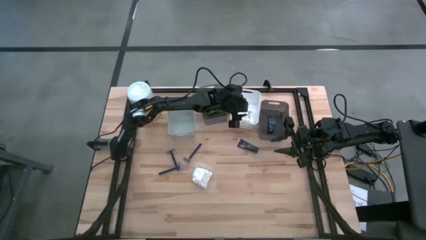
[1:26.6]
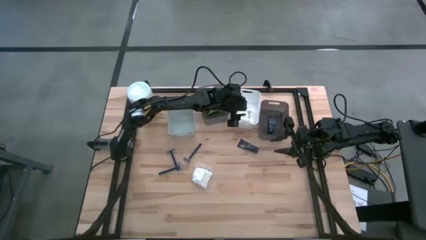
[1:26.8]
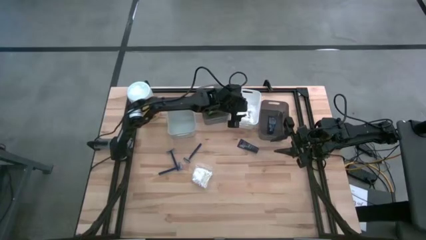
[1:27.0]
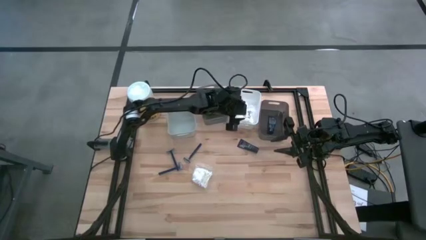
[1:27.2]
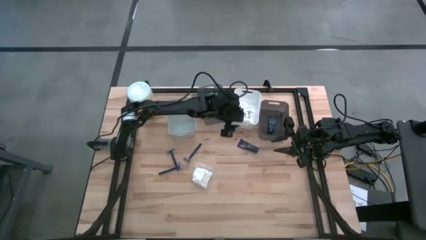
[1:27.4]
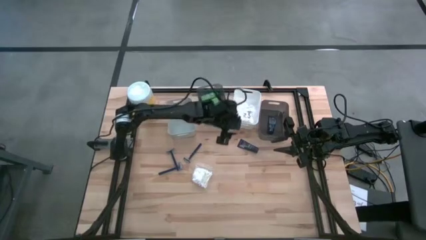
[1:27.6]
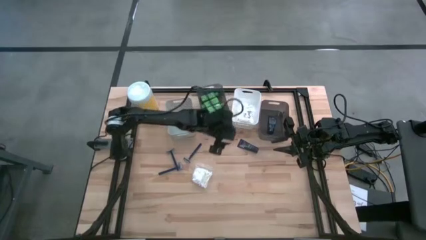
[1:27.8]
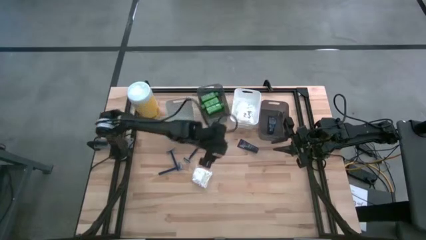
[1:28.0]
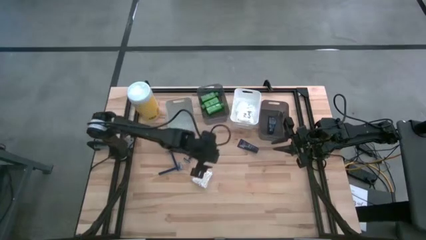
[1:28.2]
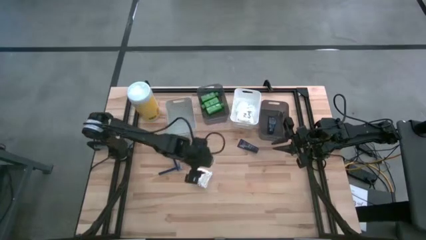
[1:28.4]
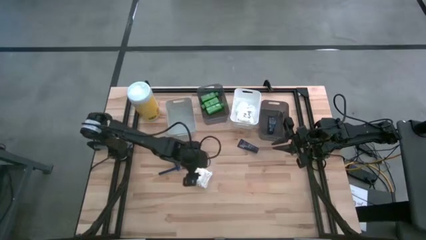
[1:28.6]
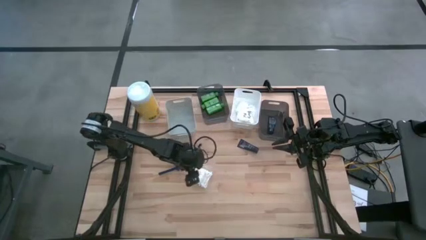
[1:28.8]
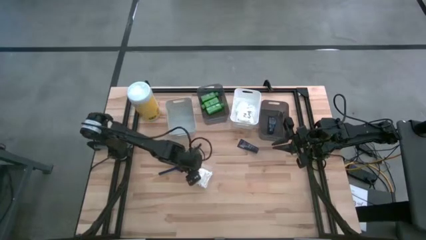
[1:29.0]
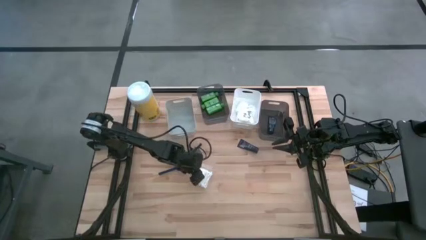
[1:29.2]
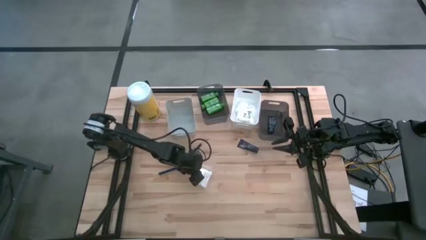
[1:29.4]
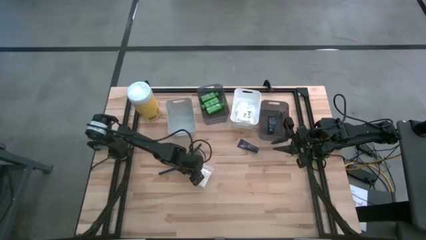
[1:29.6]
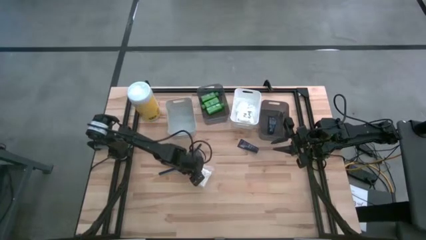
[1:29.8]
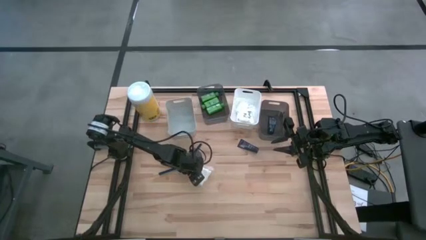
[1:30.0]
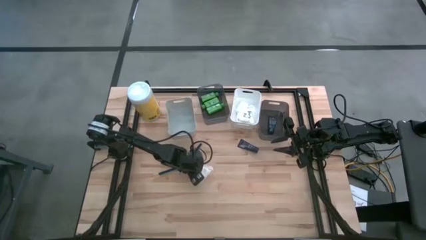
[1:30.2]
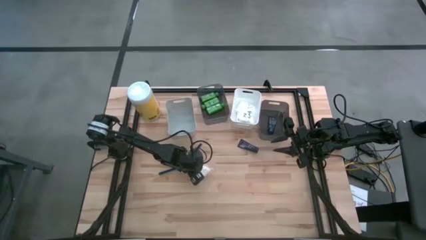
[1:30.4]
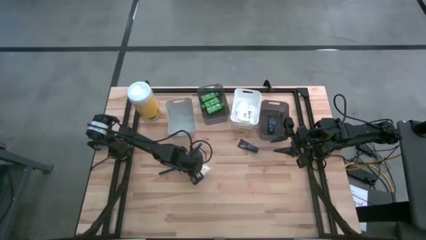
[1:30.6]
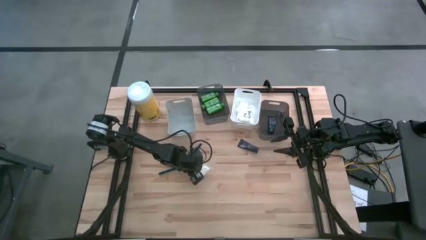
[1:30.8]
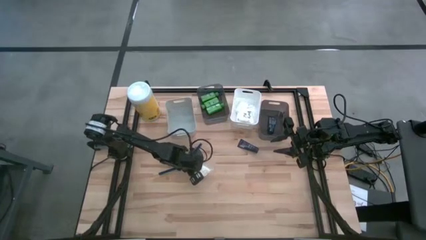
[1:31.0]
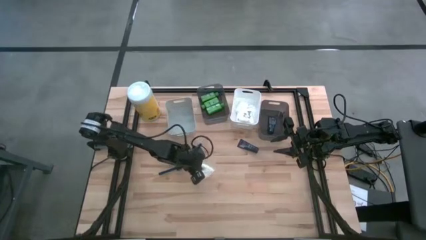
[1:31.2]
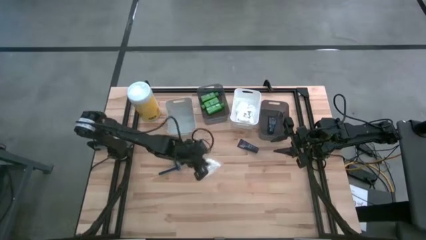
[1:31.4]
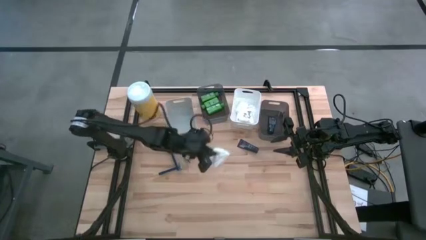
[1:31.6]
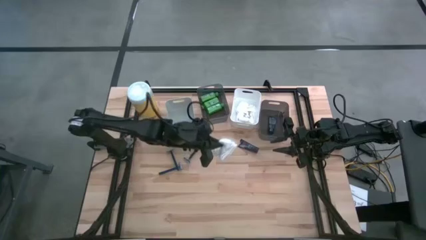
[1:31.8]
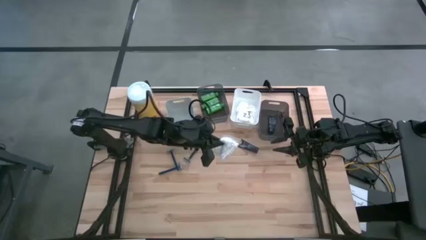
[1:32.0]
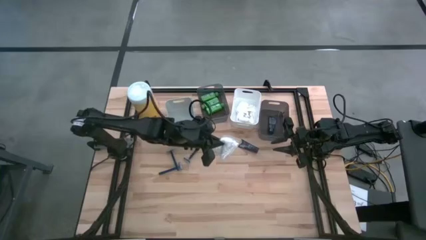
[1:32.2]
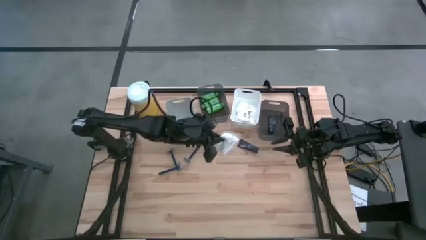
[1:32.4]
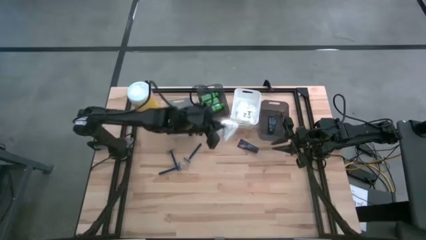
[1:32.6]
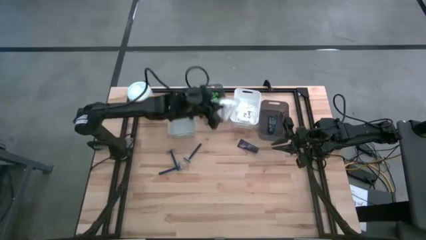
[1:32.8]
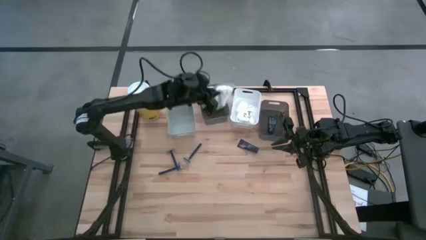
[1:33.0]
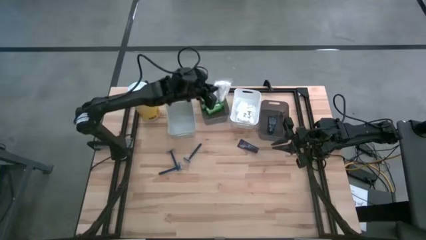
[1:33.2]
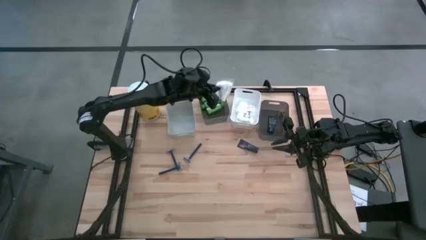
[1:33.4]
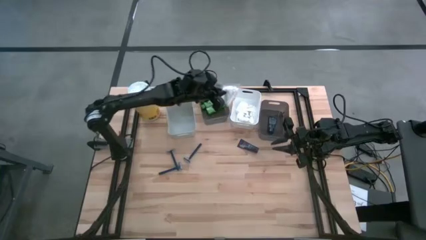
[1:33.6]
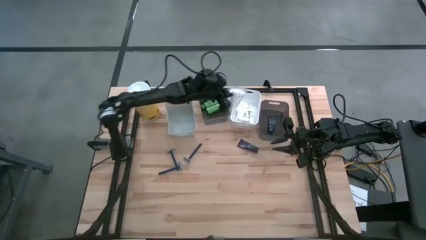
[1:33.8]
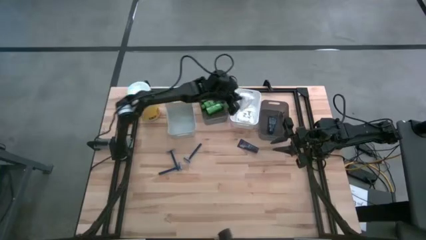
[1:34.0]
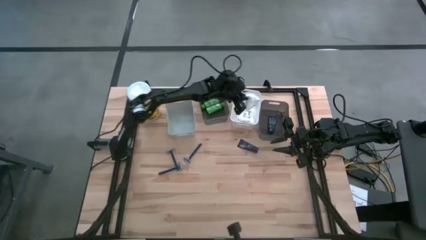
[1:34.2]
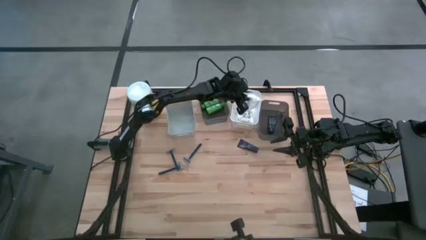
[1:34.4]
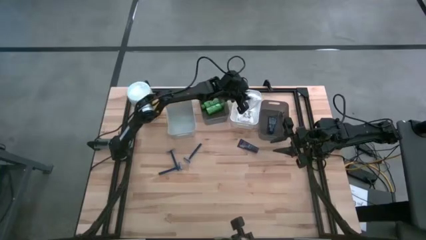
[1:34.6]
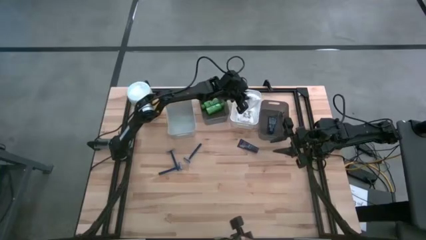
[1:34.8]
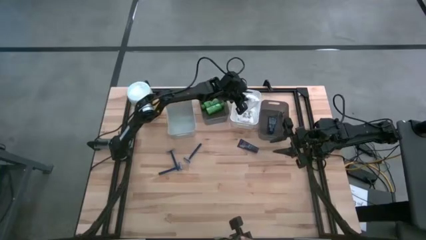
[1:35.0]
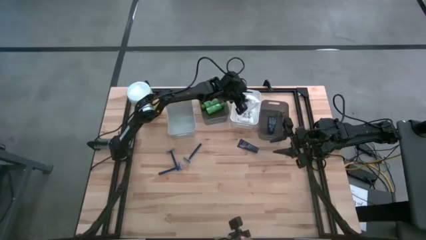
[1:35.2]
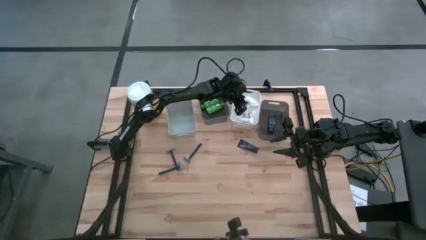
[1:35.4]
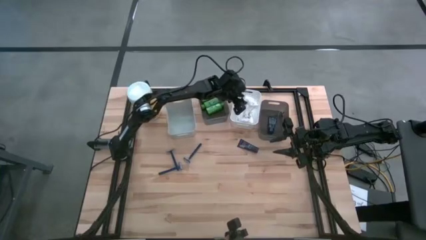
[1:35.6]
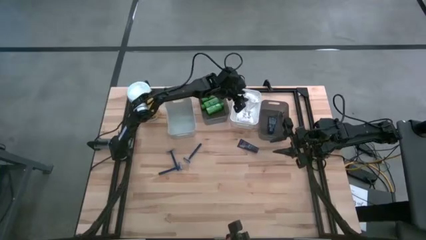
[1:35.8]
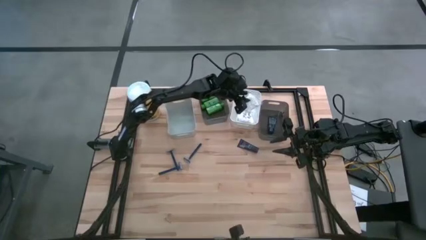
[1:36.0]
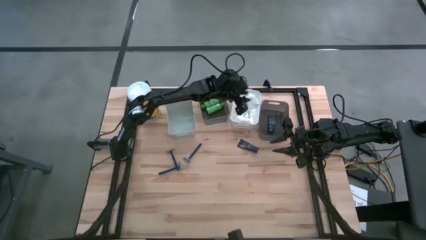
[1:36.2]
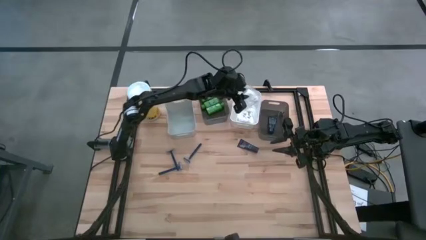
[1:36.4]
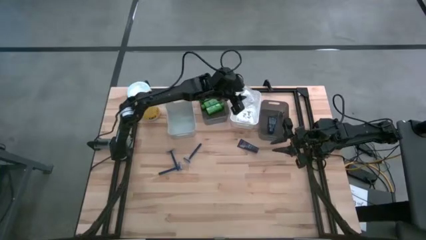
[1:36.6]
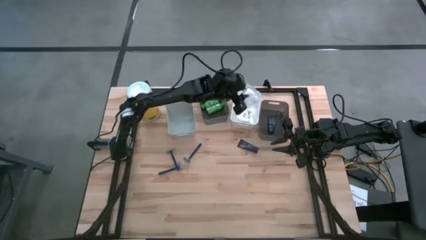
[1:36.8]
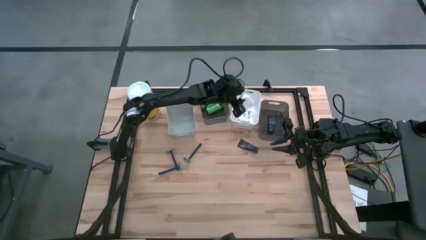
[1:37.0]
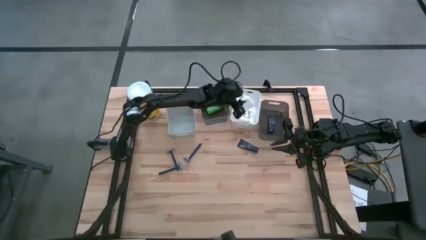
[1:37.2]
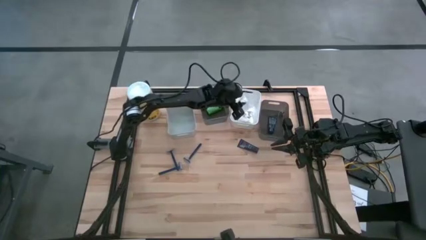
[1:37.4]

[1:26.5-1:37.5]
Task: Pick & Place Travel size toiletries
Put the white cotton pack into the white bin

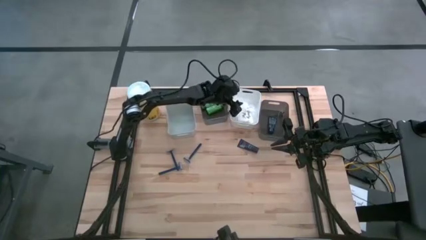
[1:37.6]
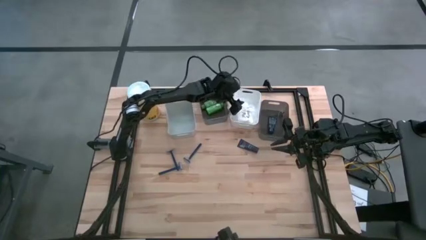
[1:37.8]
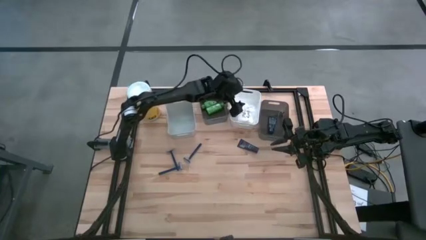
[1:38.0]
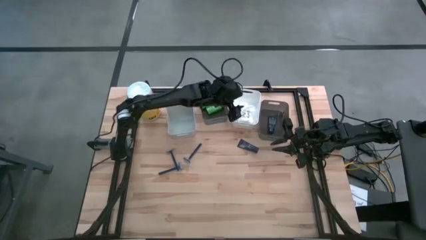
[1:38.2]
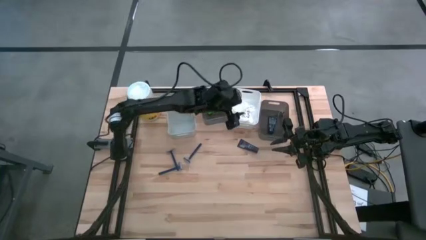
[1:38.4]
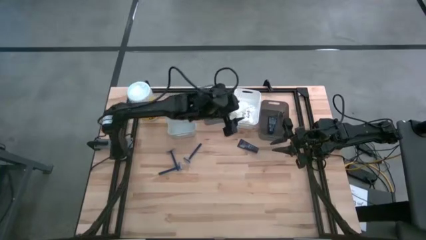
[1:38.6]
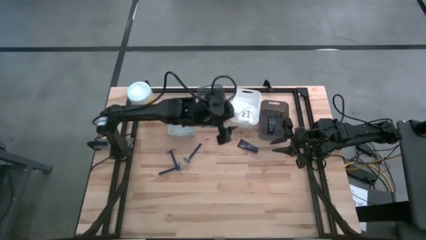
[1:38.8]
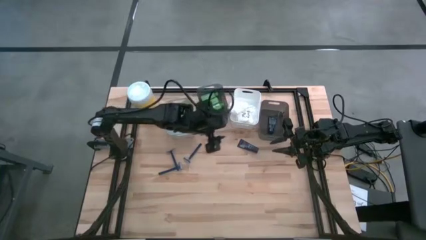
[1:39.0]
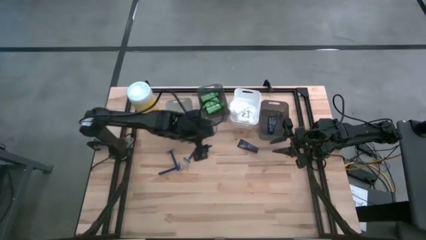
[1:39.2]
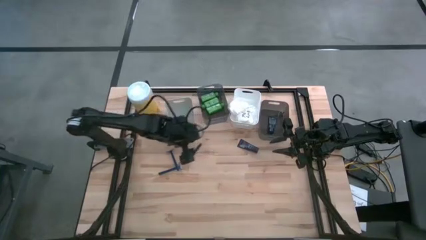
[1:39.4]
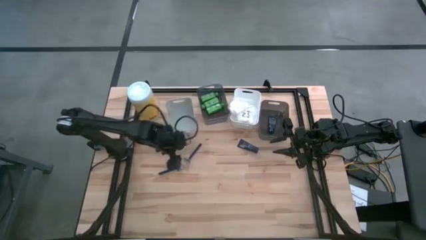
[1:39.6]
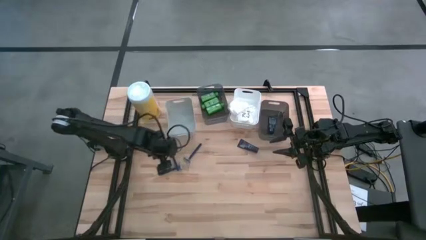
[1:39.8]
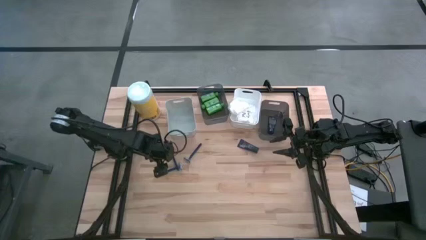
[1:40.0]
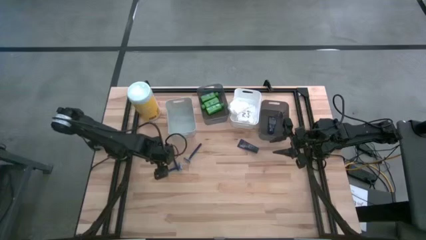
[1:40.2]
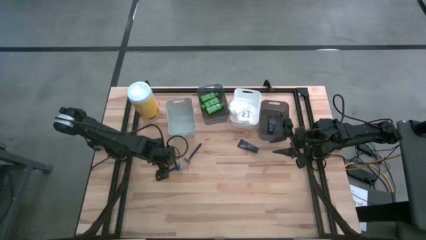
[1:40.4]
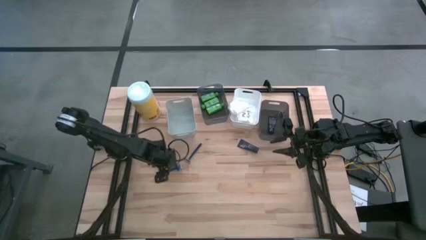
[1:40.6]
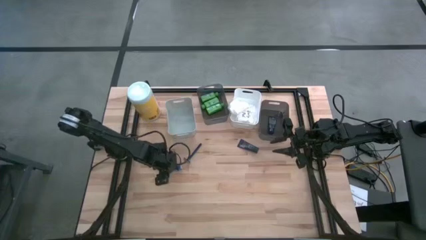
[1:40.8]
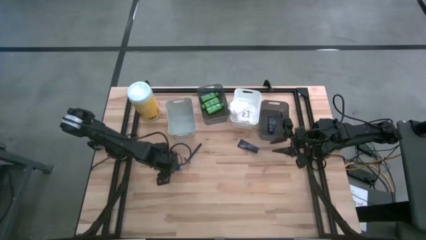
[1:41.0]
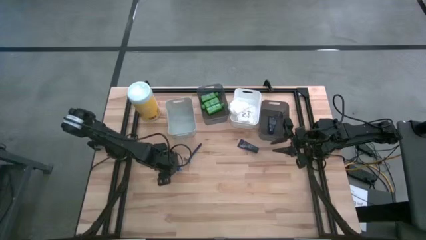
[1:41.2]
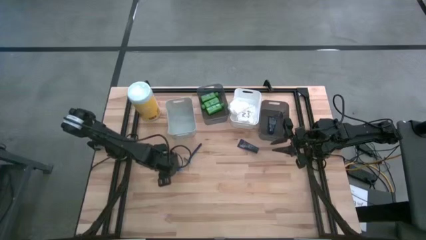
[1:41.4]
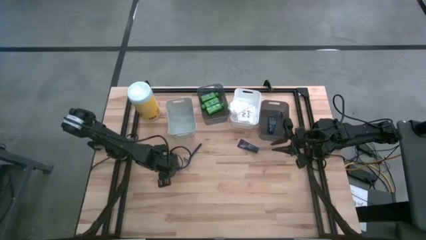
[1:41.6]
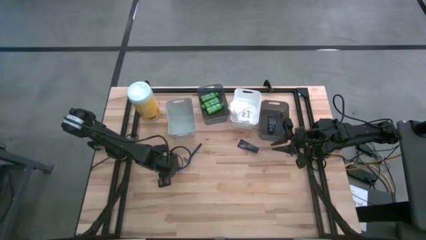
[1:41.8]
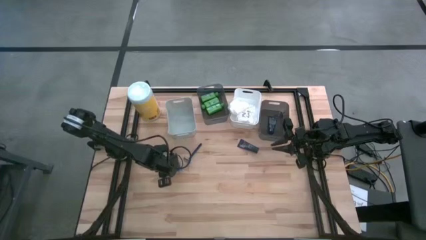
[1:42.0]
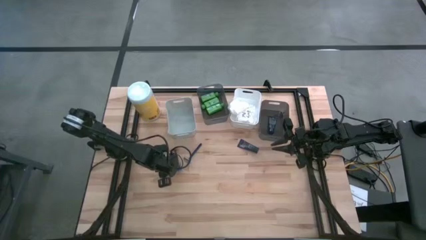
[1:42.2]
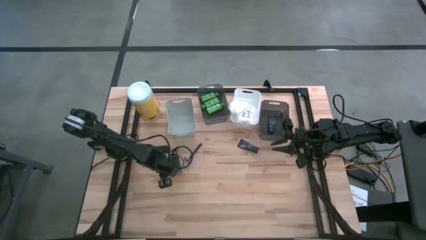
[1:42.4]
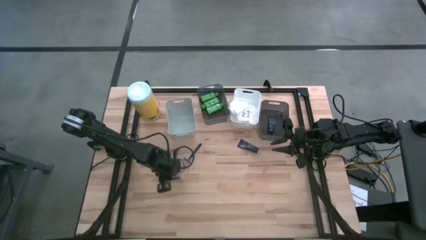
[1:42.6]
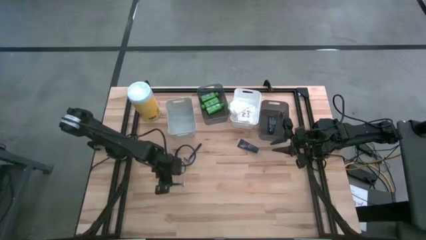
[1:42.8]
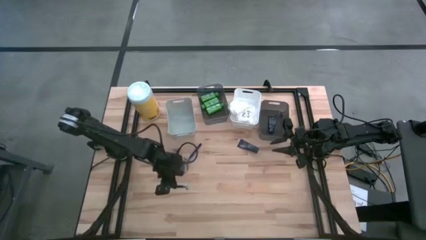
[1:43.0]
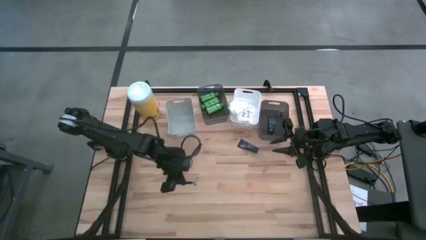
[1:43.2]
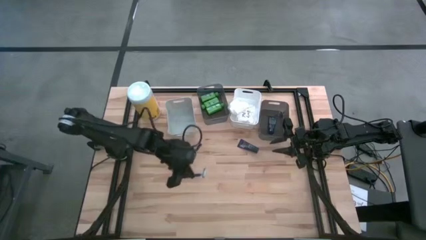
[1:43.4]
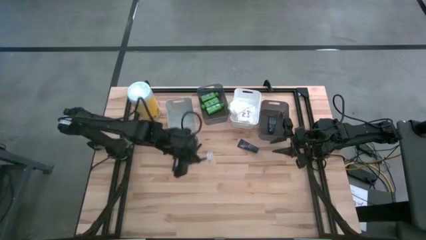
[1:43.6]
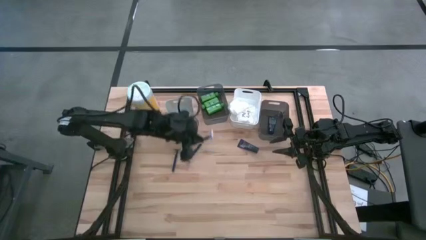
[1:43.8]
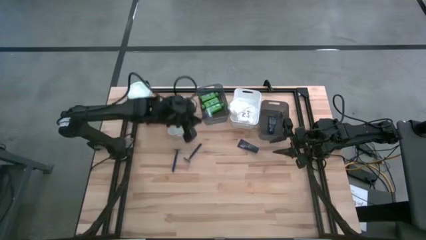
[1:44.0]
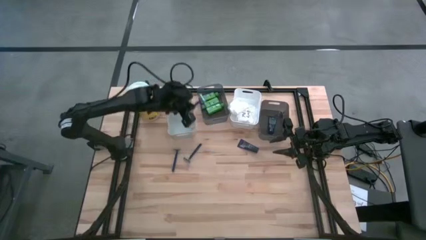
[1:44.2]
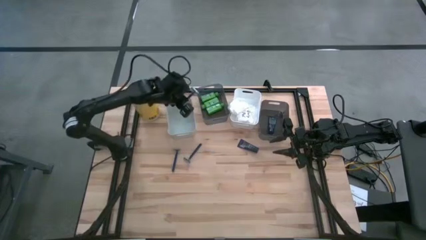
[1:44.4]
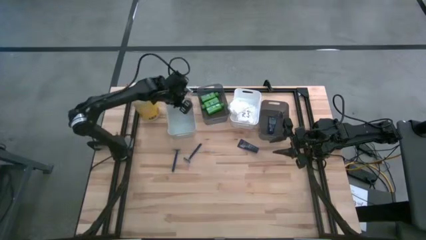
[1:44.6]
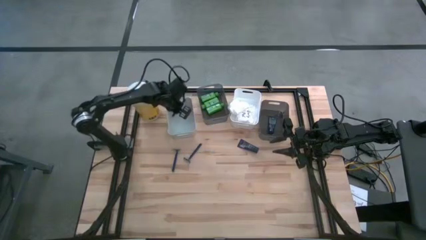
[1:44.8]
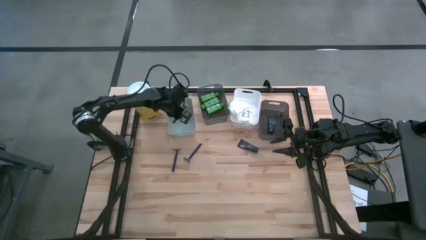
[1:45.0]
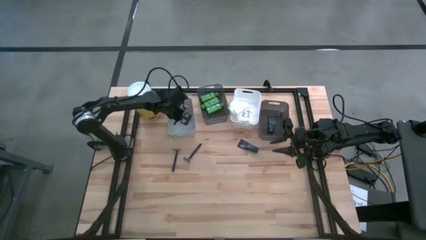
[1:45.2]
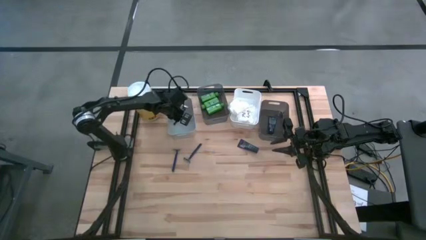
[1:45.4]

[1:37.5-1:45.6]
Put the blue razor into the gray bin
